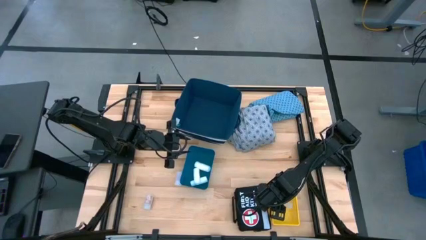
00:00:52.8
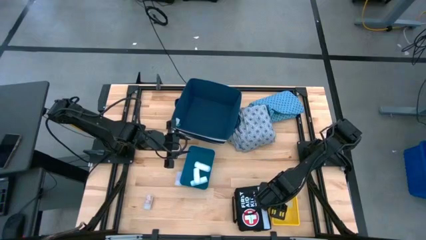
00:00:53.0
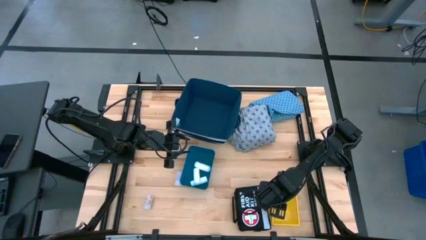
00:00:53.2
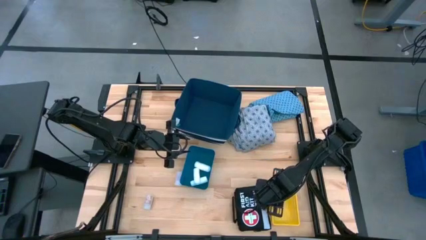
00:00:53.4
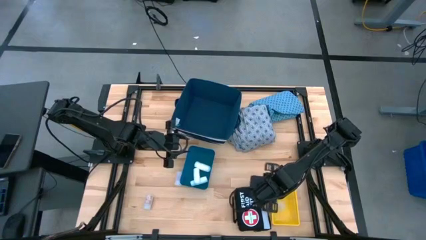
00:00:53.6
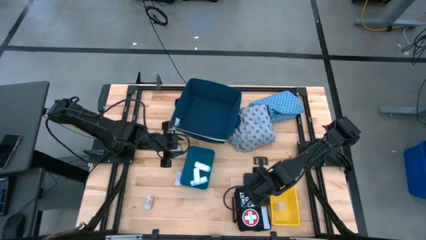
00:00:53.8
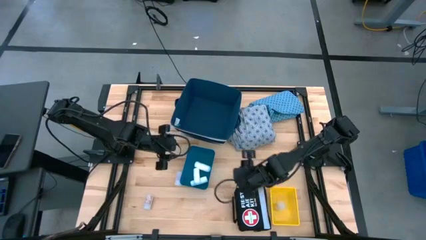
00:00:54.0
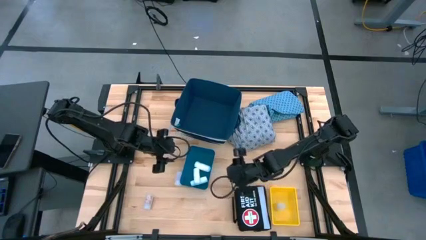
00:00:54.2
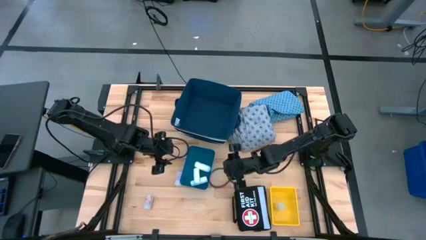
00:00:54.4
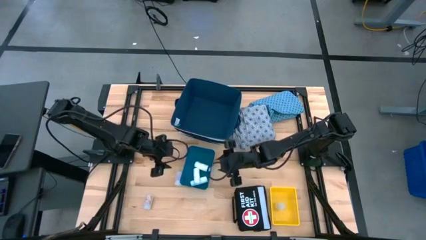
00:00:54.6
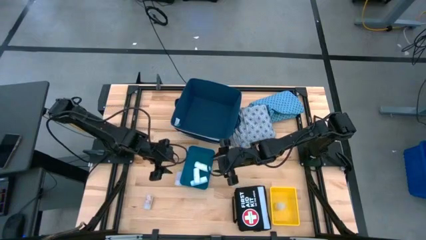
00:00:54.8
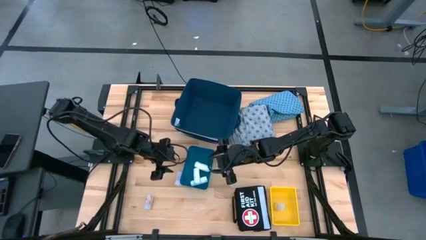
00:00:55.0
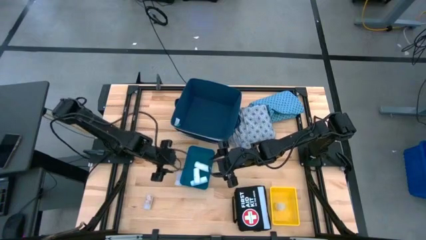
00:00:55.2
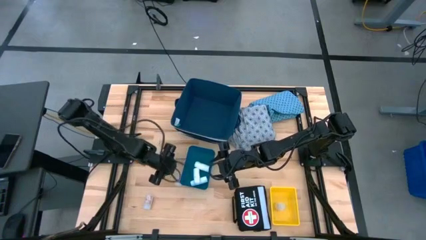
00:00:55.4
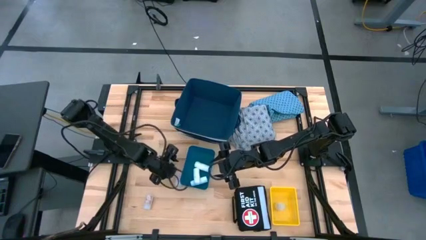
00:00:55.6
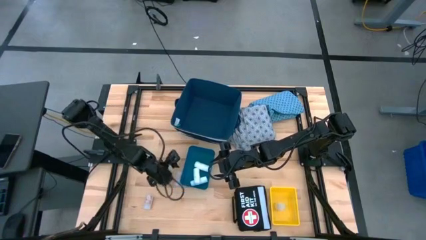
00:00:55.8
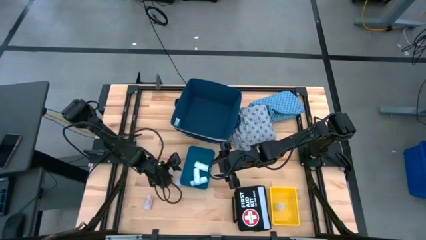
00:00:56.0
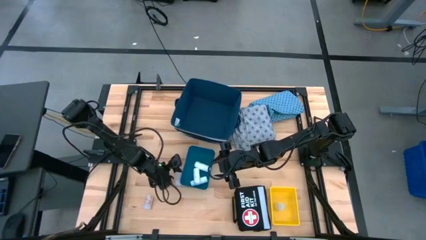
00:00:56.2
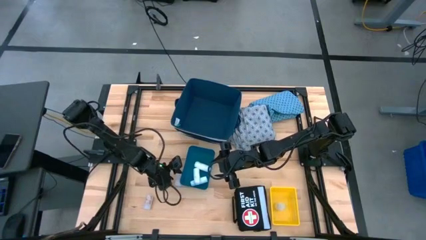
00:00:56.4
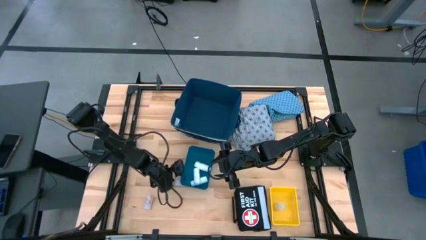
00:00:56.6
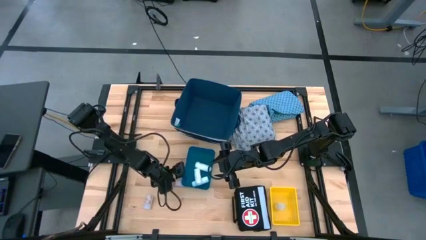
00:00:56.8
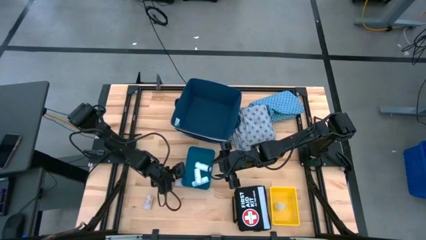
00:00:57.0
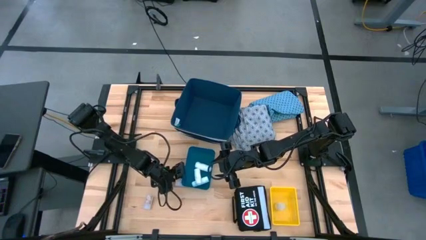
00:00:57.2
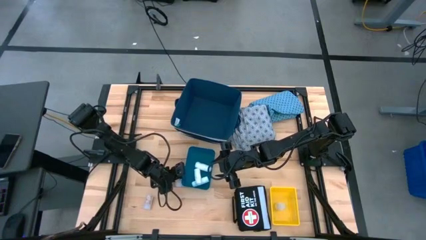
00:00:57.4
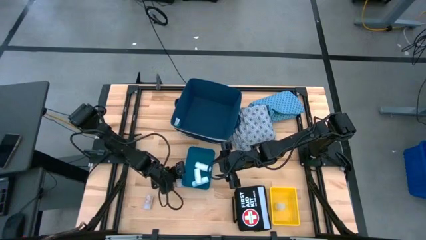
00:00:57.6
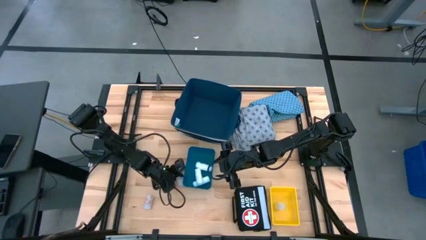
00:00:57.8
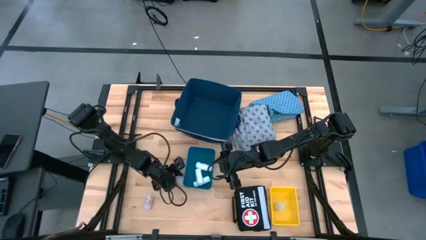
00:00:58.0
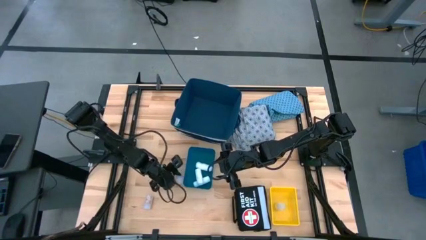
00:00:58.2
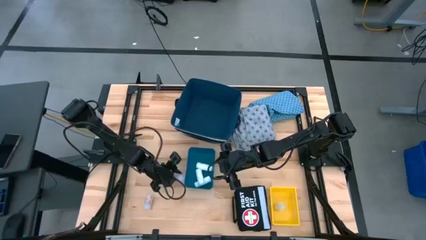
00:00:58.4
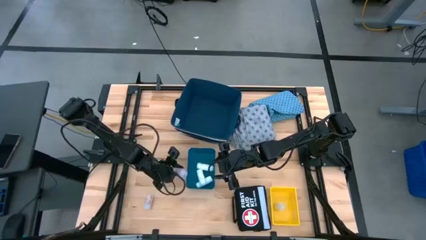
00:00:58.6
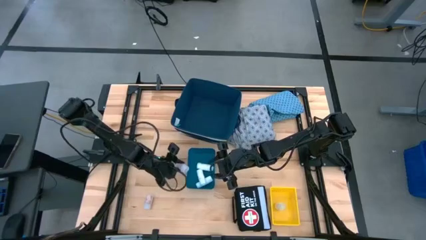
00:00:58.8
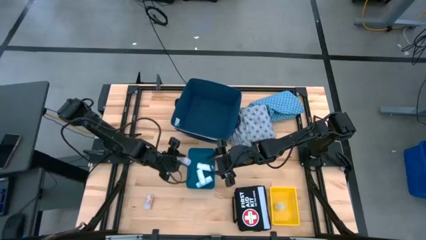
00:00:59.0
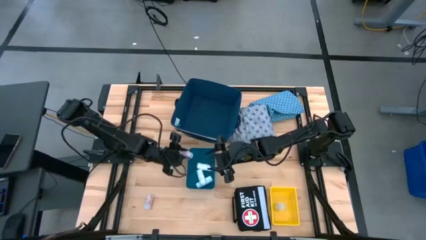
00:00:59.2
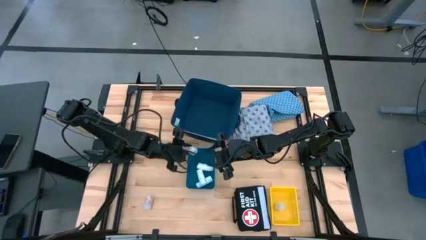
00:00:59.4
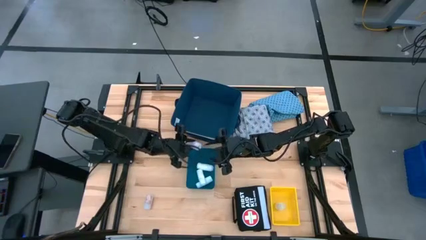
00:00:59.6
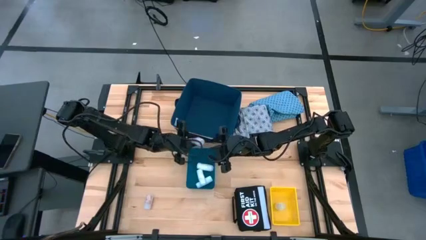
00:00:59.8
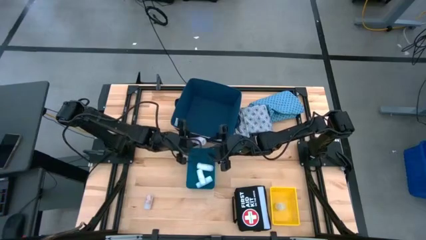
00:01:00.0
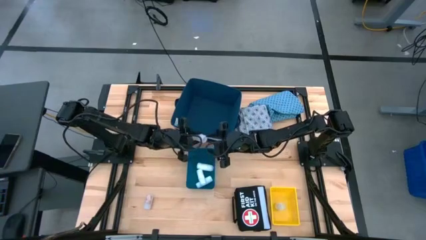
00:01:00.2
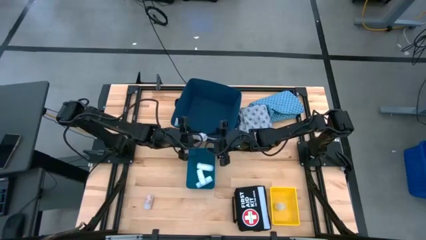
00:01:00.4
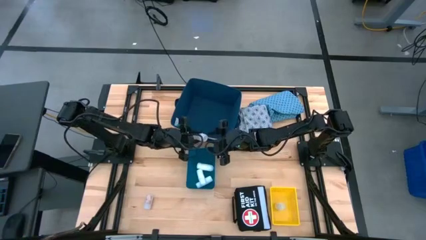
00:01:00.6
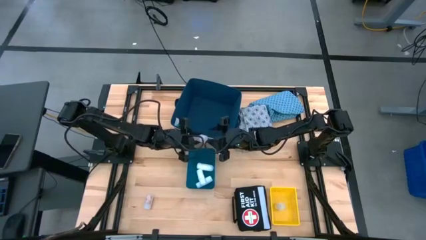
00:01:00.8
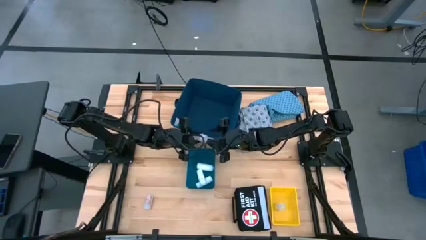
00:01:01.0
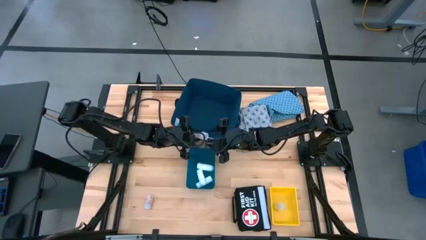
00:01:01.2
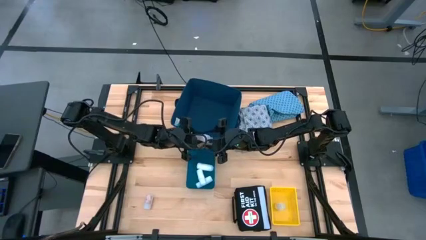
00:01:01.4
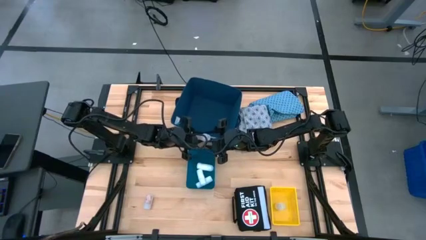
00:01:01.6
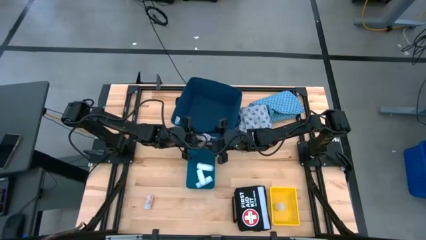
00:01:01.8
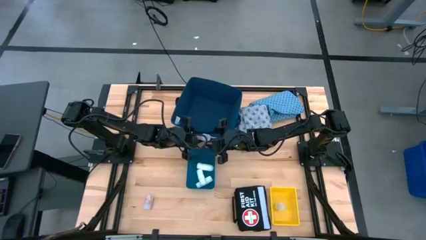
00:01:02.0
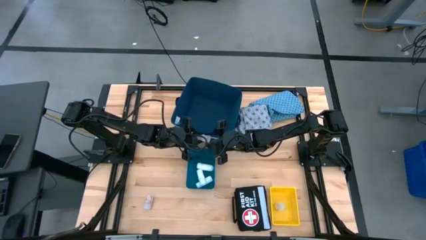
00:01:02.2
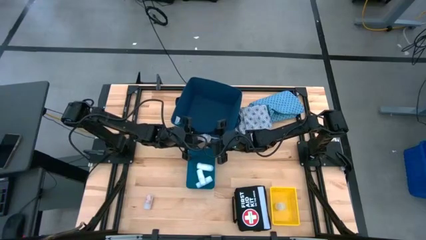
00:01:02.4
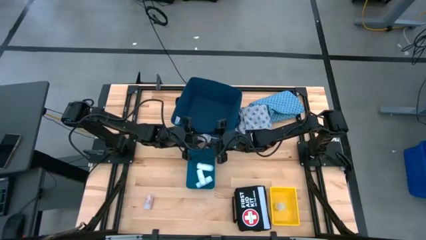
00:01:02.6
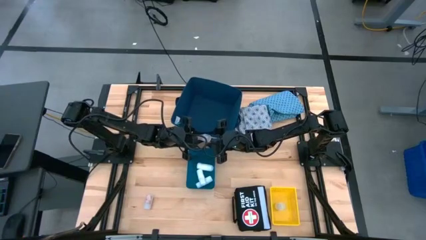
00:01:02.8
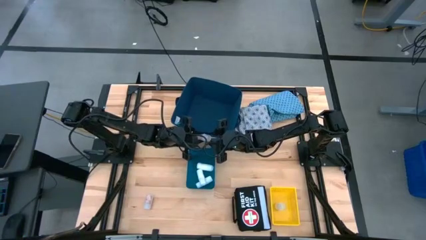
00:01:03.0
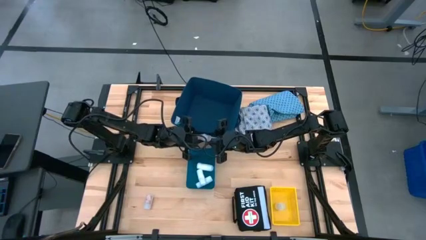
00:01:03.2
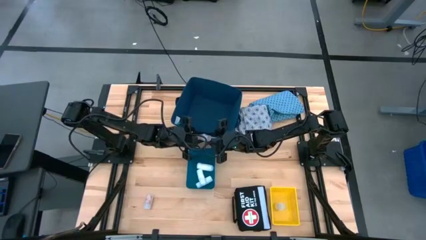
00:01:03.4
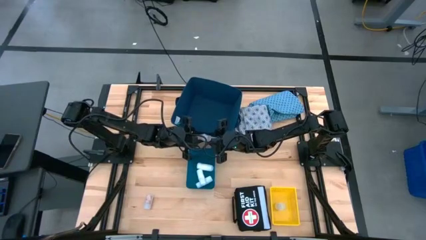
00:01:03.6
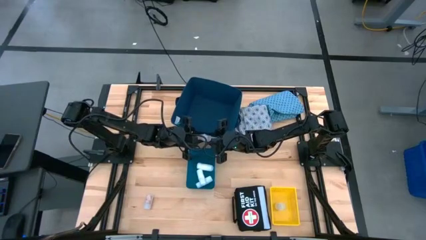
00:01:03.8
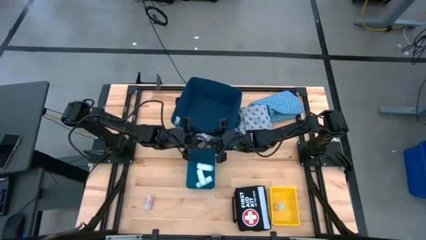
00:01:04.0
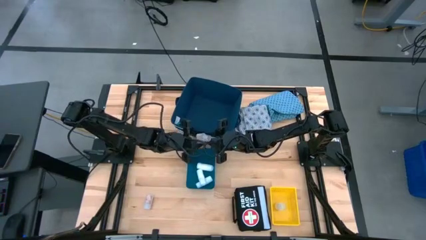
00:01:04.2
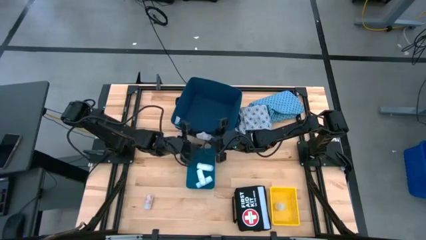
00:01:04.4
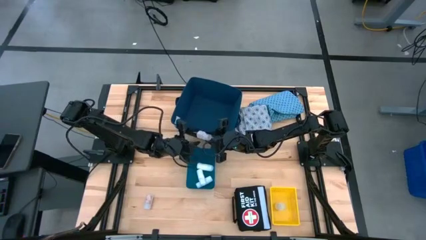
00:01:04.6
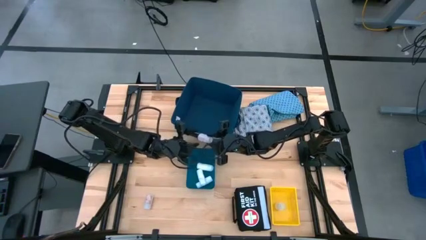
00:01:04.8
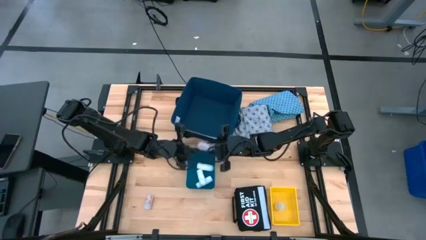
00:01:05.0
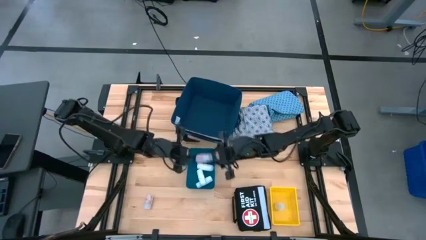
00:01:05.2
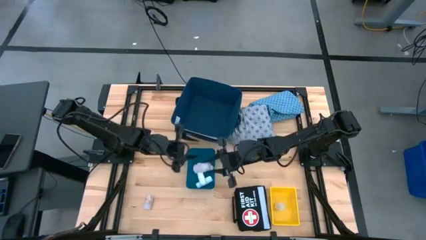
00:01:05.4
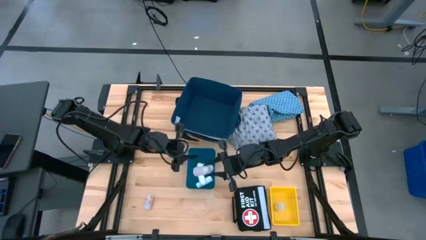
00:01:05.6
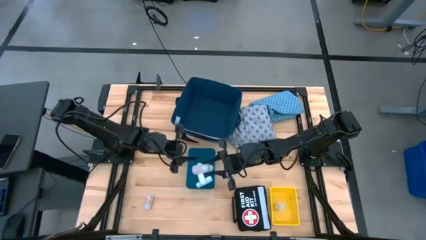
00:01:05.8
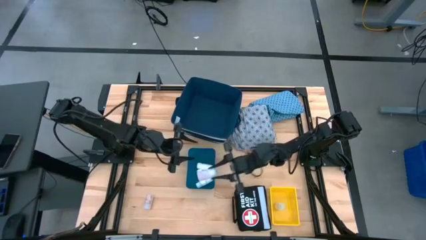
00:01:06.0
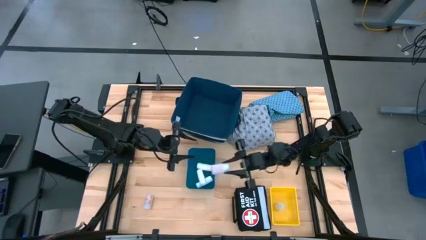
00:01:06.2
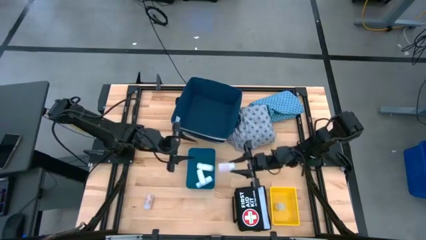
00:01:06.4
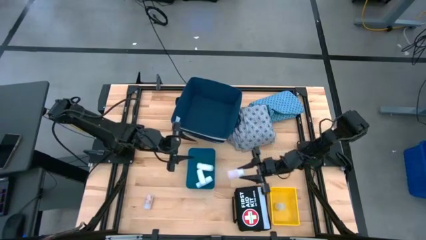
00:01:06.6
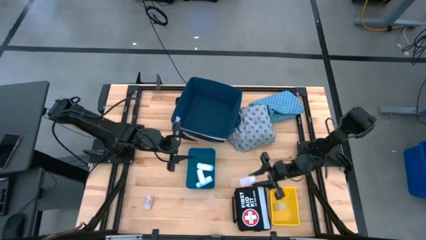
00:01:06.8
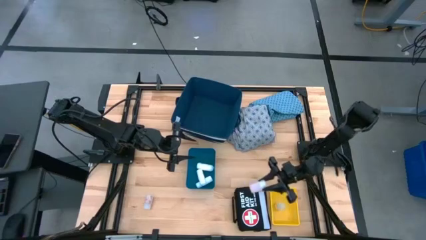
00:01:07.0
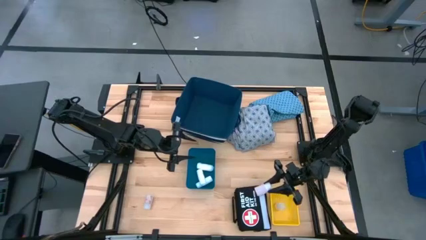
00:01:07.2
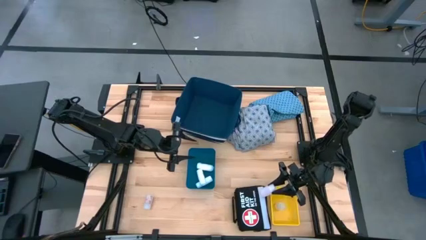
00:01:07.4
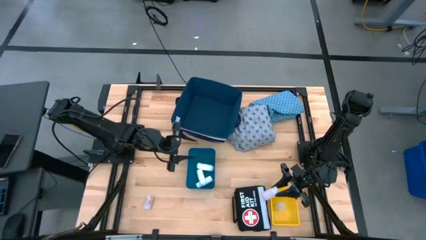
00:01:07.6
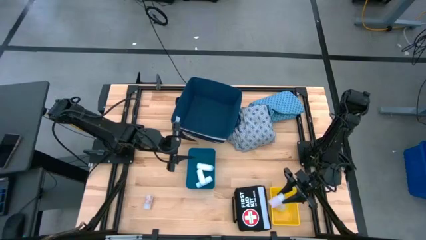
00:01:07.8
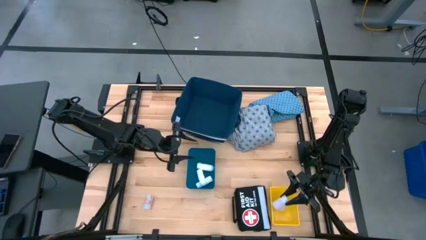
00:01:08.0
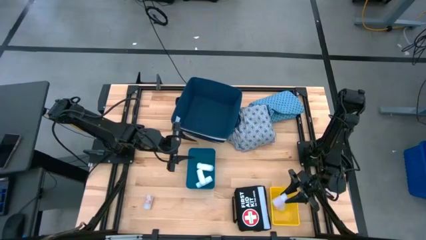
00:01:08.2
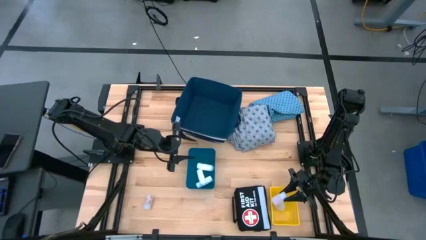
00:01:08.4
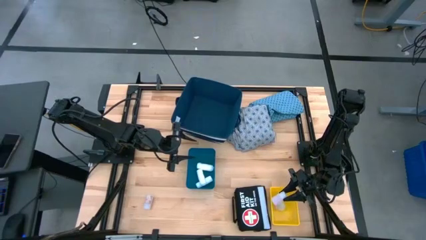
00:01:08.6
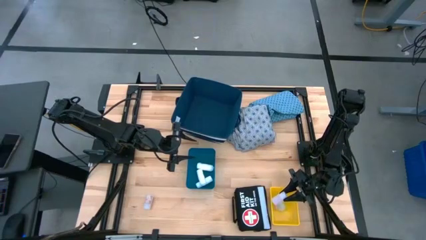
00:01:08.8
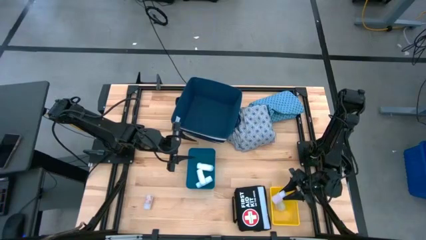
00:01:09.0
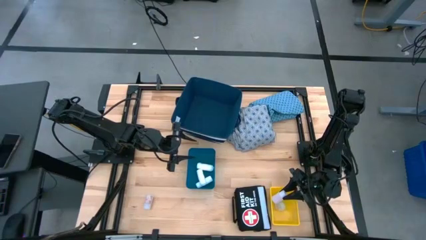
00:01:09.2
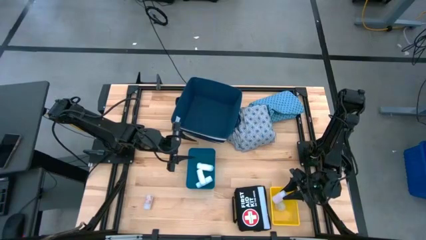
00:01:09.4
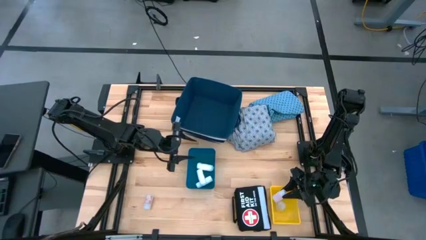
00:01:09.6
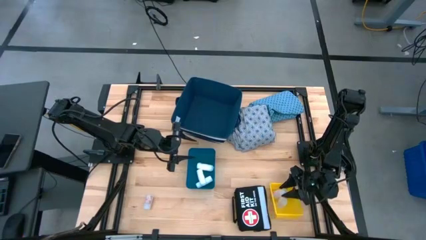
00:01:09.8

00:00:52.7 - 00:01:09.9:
Task: Pick & place medical supplies in basket/bin
Put the right transparent bottle in the yellow bin
